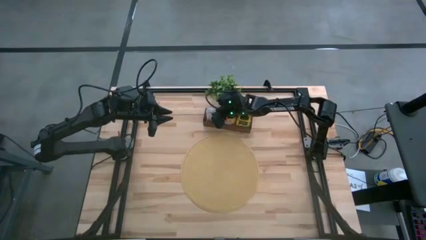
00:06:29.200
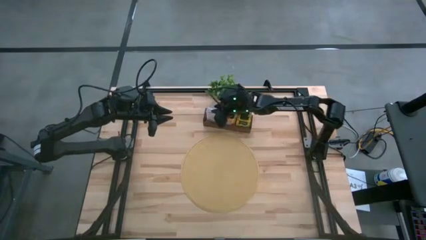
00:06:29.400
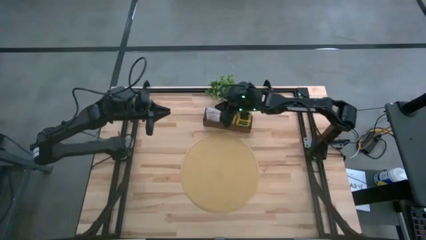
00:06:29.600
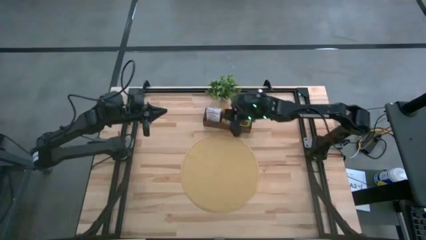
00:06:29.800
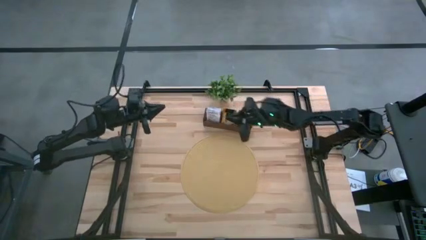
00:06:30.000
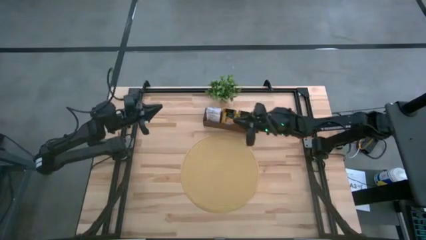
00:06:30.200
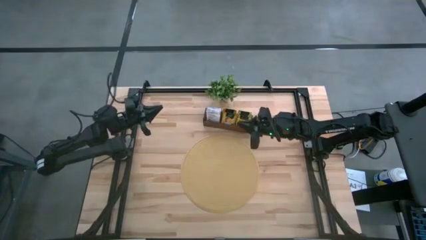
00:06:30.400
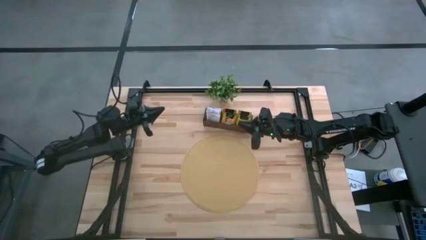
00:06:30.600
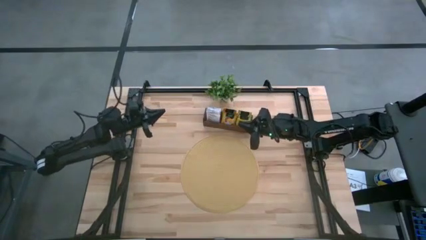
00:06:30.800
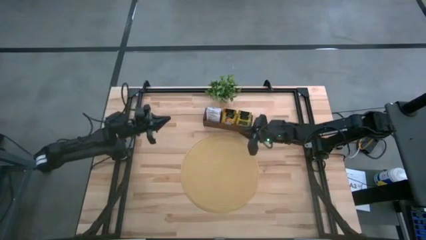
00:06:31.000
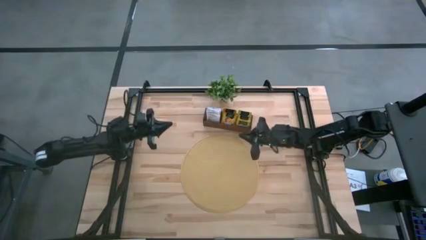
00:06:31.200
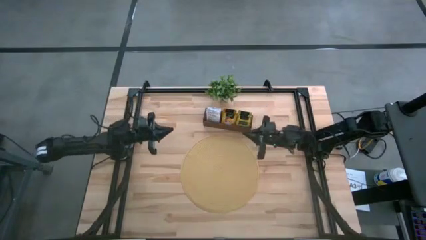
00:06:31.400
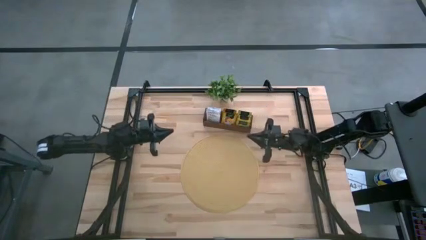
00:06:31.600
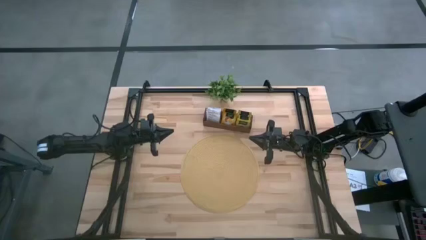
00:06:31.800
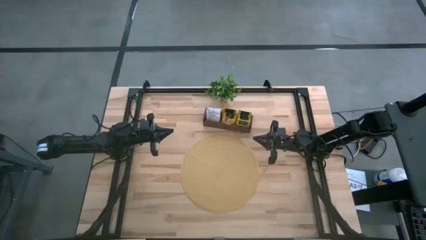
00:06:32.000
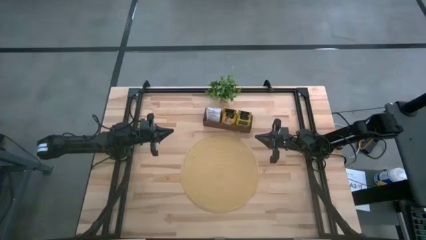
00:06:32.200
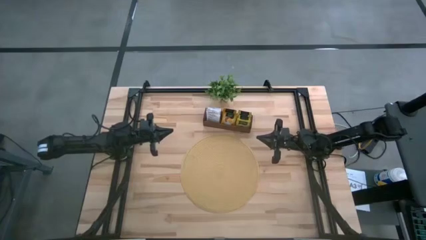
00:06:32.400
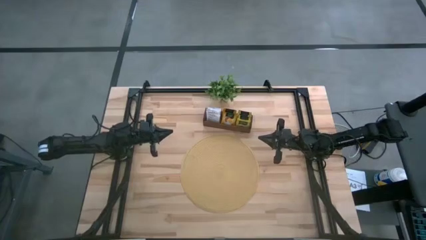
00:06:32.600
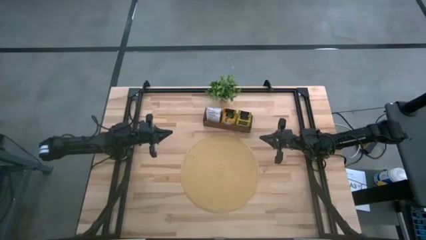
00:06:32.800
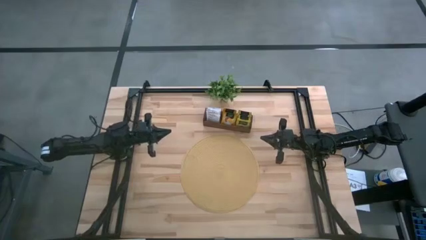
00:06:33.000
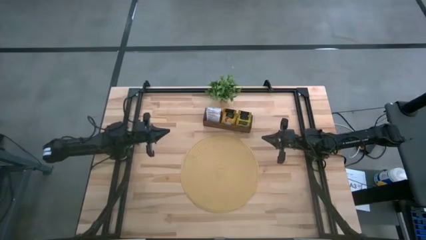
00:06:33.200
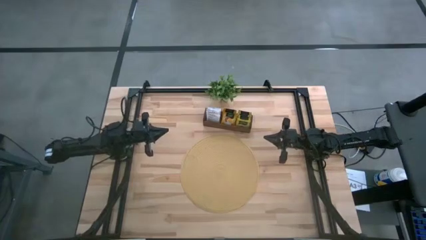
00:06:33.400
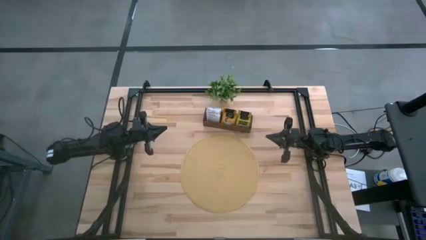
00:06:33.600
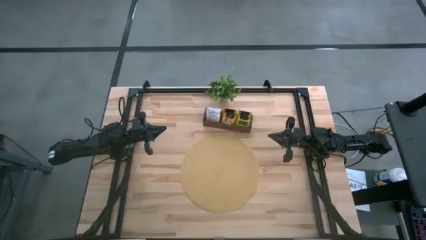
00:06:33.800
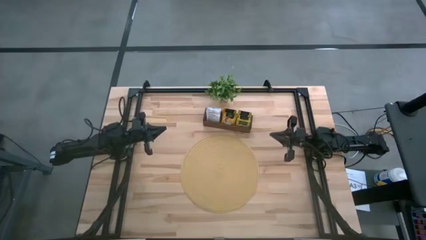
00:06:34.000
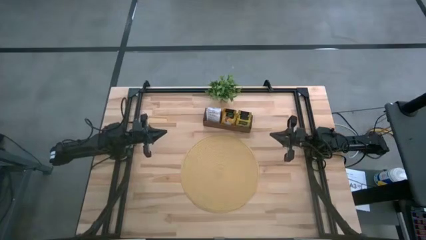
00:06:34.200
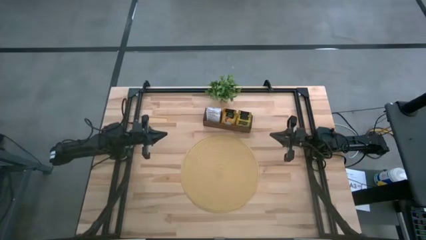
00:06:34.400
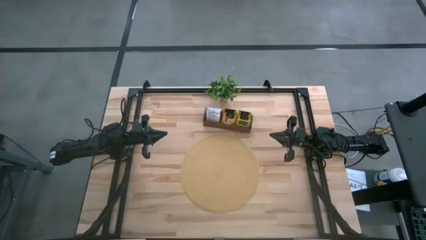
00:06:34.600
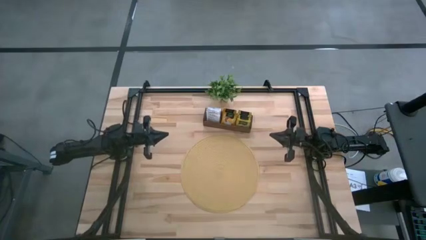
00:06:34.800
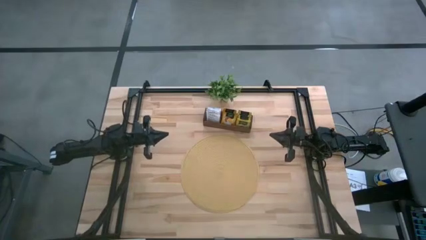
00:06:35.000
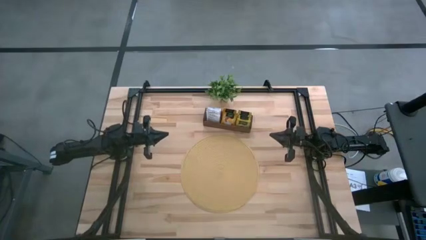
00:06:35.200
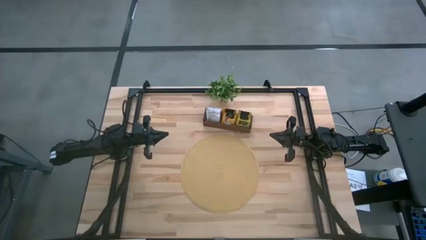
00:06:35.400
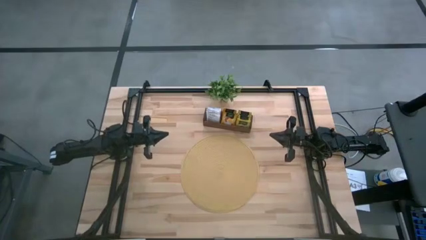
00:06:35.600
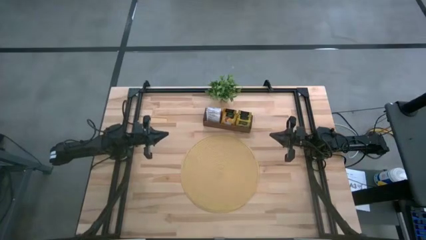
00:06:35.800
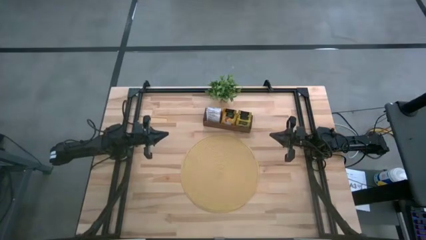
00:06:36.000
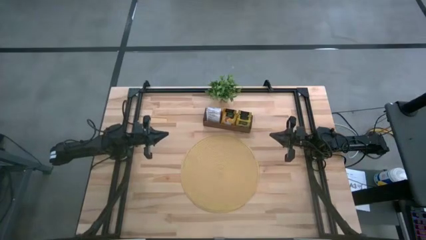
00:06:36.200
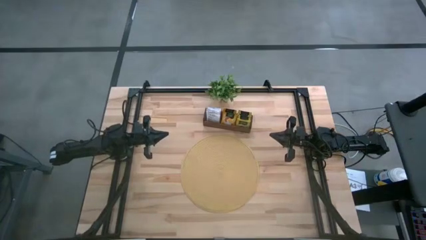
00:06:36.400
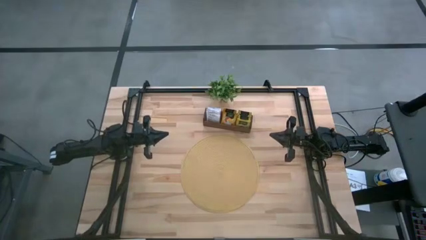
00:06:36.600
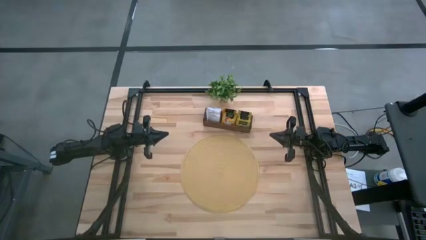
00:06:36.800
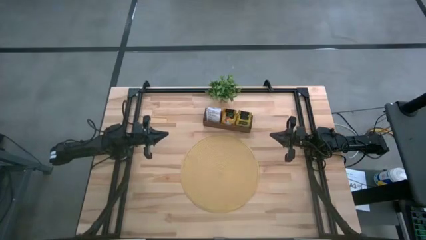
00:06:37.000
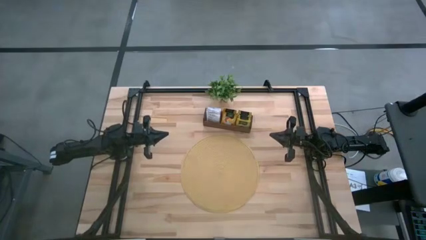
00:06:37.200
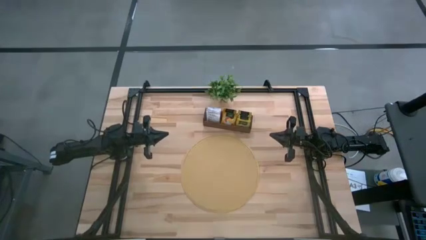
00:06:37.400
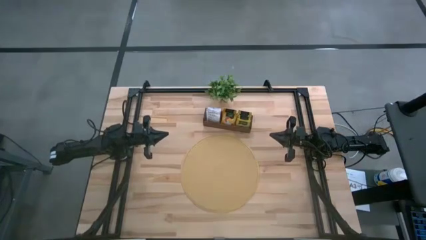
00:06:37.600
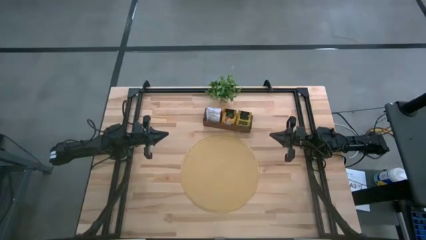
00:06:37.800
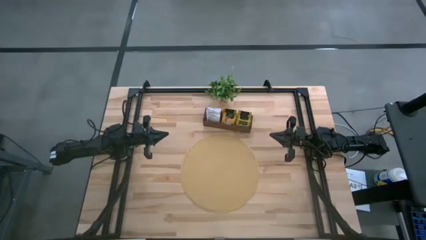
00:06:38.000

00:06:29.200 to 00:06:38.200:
Task: Pick & Place Tea
Return to Home Position

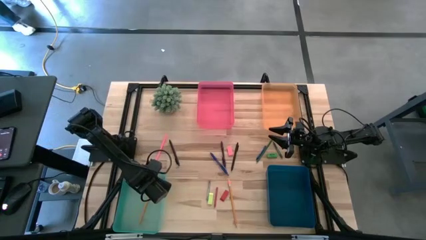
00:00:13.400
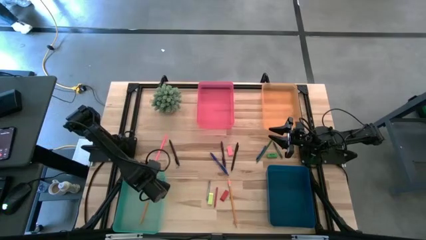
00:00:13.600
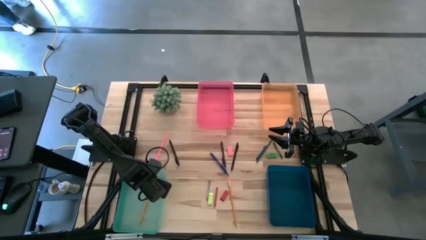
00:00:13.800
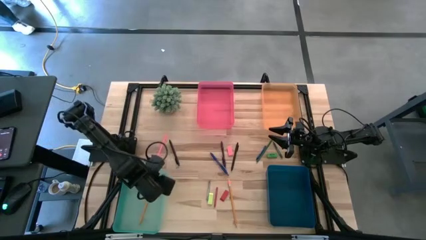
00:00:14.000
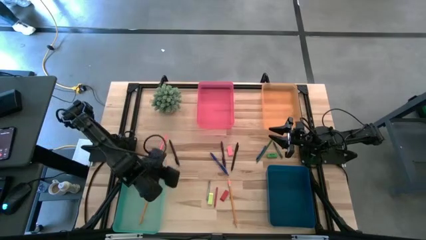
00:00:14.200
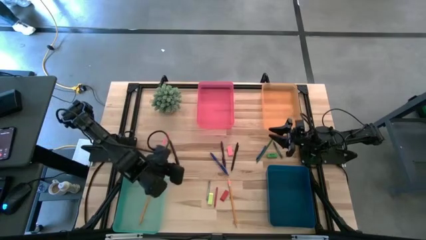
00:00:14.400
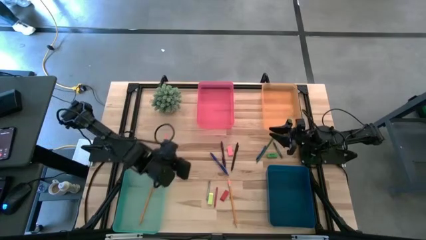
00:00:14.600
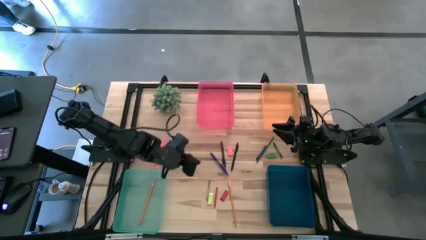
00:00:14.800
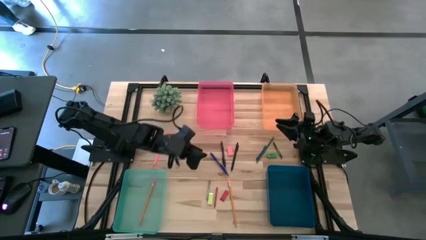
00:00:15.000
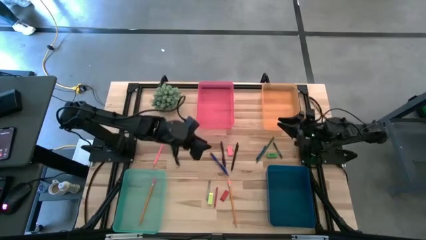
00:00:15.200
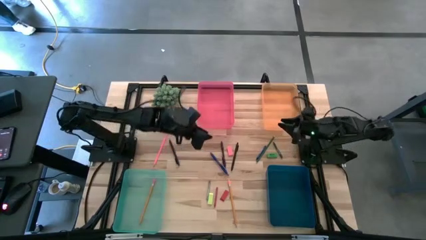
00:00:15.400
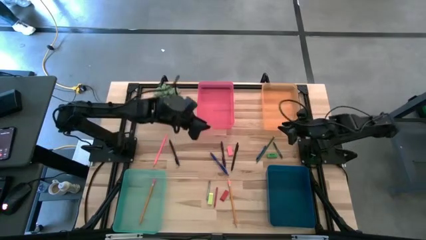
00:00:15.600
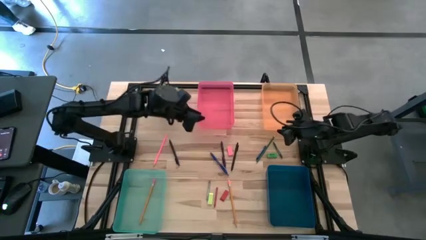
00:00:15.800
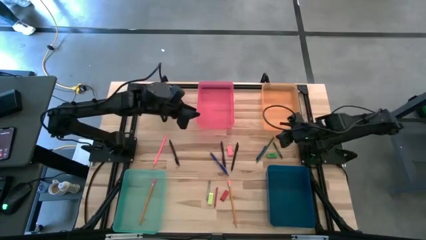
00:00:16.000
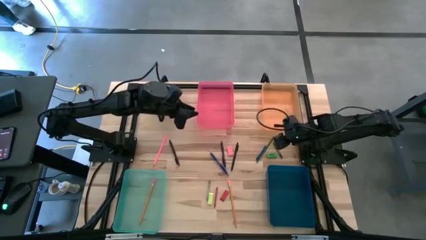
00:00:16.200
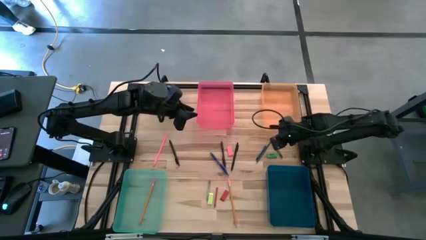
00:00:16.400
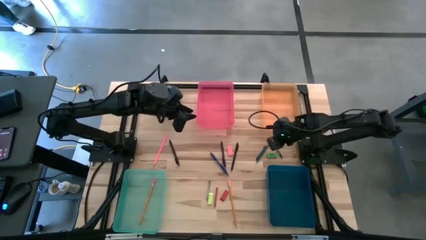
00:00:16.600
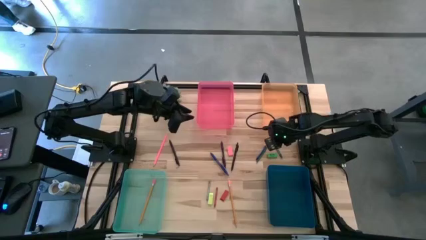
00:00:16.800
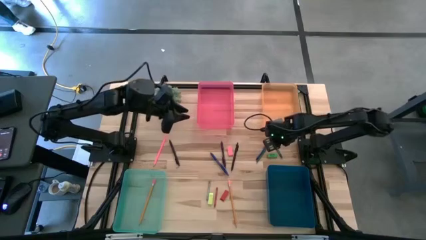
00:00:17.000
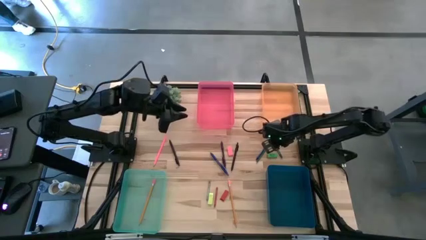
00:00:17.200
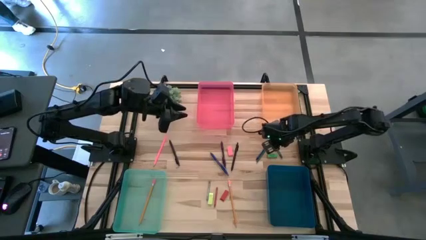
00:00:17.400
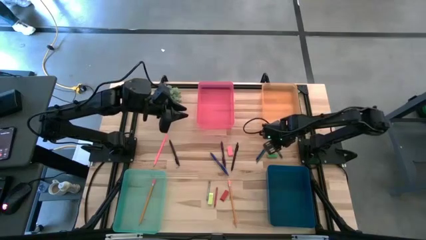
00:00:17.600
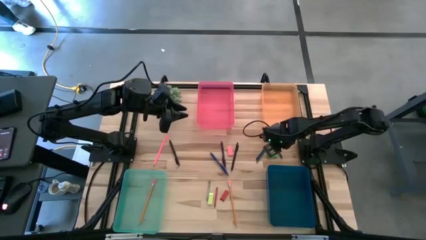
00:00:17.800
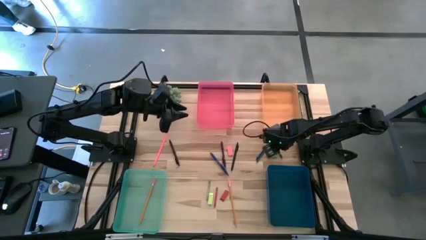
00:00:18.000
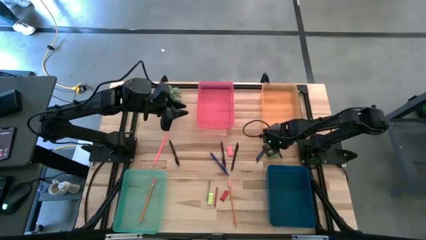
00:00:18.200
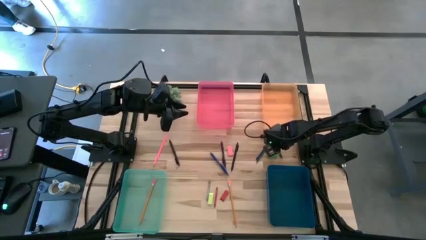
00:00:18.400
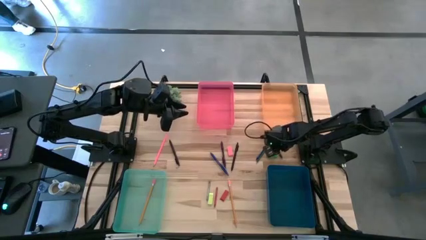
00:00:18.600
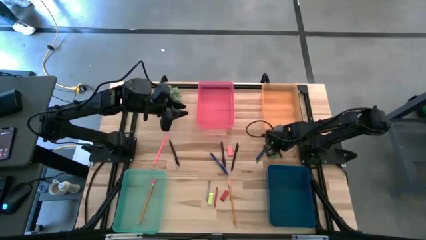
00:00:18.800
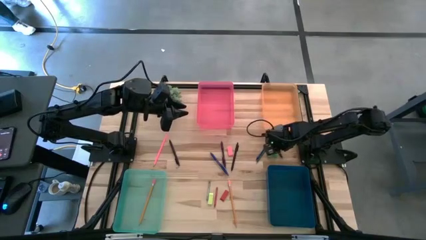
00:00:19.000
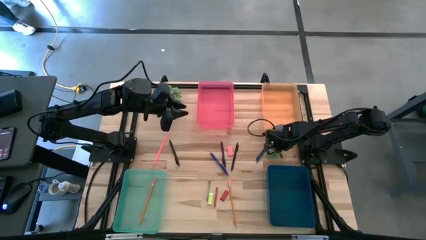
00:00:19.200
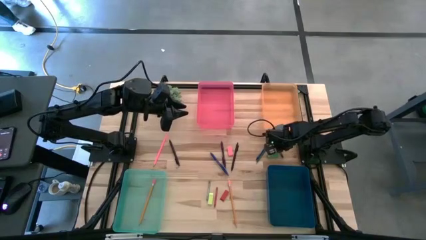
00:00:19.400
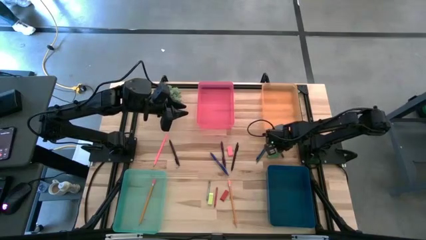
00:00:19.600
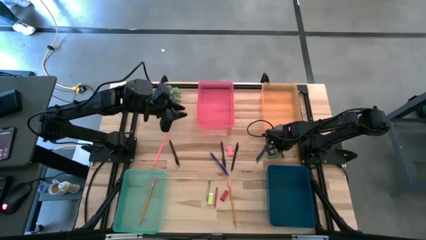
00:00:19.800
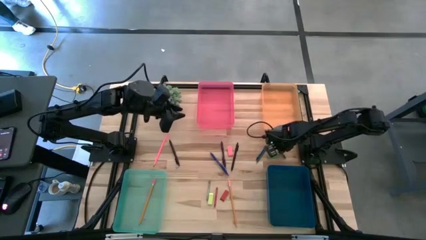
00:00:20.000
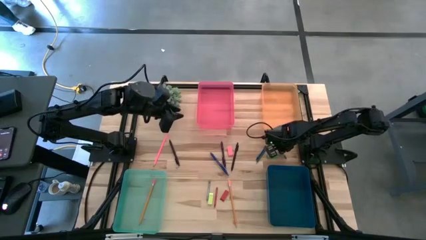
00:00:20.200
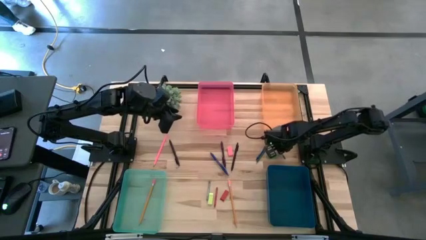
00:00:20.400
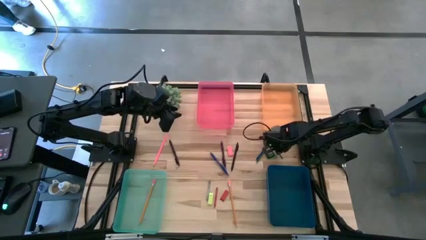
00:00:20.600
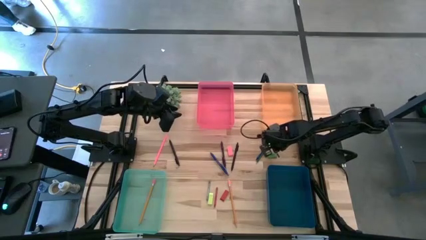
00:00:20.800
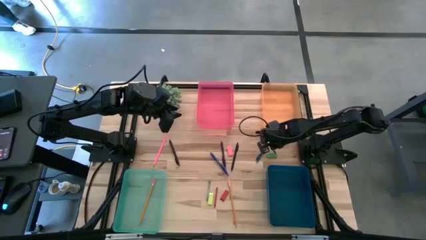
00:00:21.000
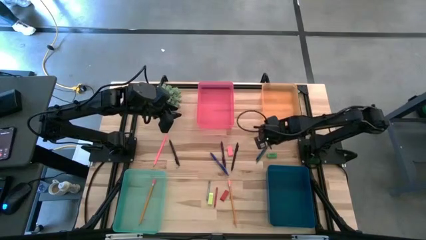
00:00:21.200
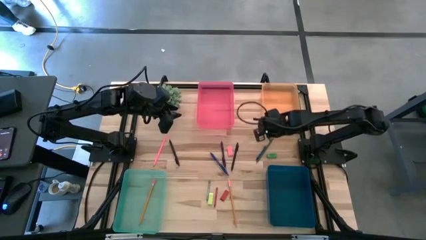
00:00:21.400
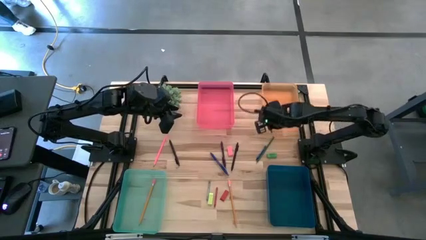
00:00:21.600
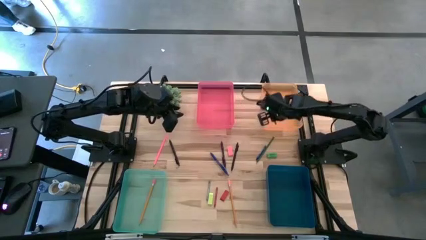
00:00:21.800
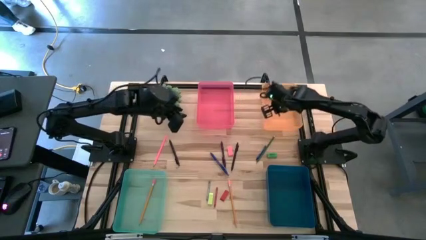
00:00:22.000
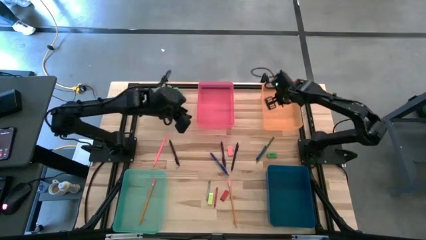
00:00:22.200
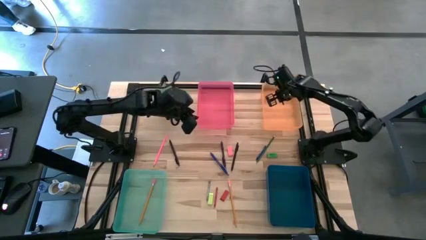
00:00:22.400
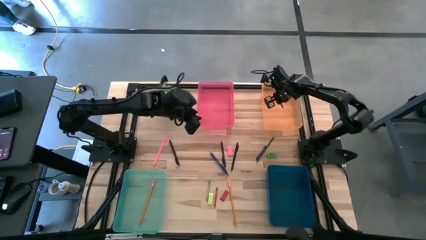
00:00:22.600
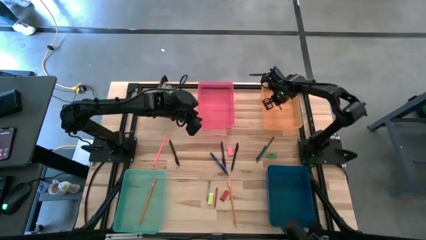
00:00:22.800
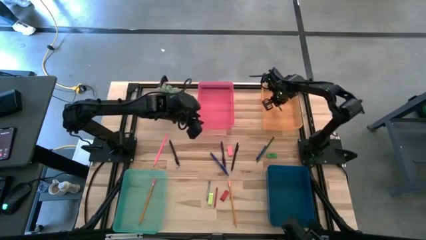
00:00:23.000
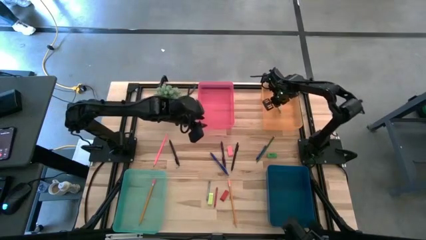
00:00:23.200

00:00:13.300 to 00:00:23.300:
Task: Sort crayons/erasers/pens/pencils in bins
Put the green crayon into the orange bin
